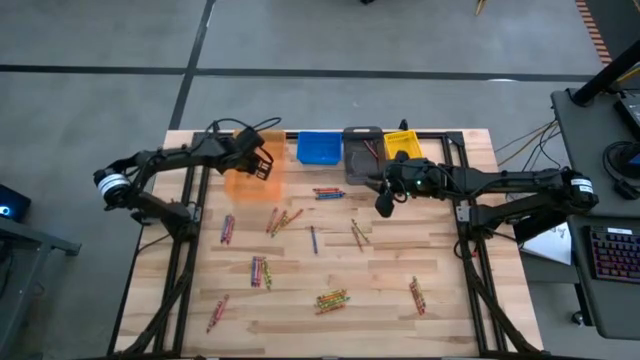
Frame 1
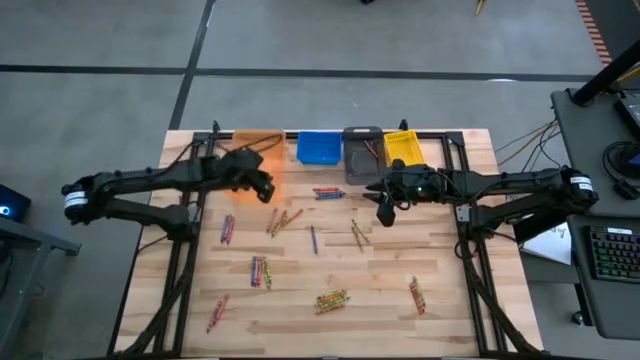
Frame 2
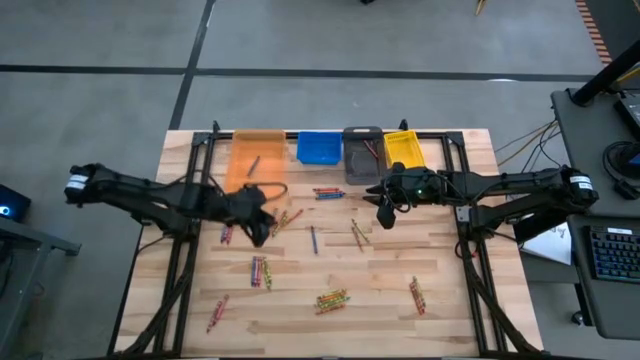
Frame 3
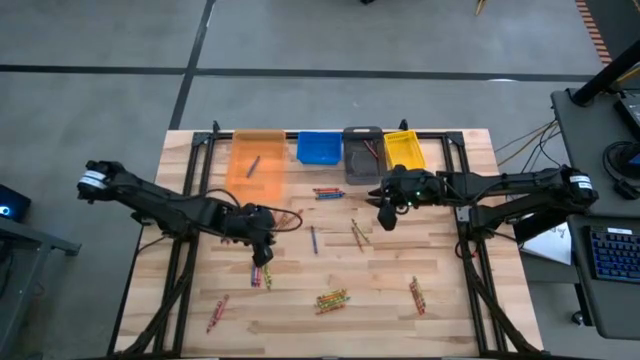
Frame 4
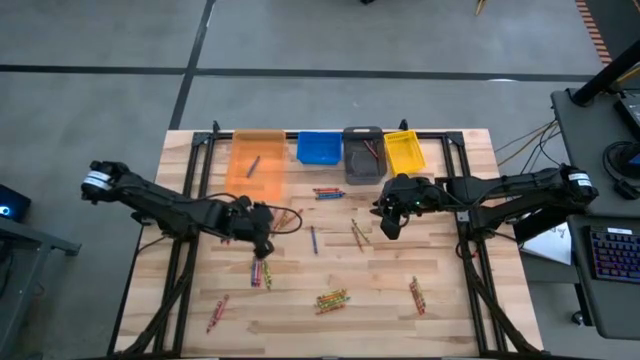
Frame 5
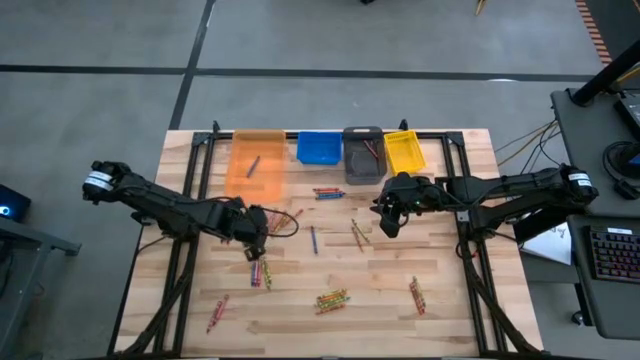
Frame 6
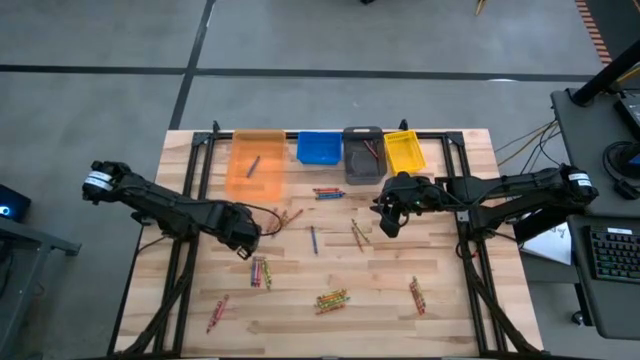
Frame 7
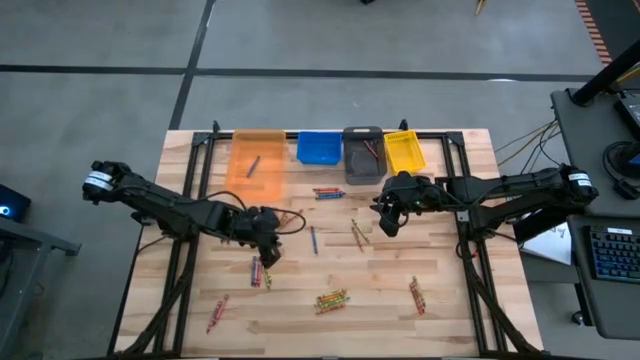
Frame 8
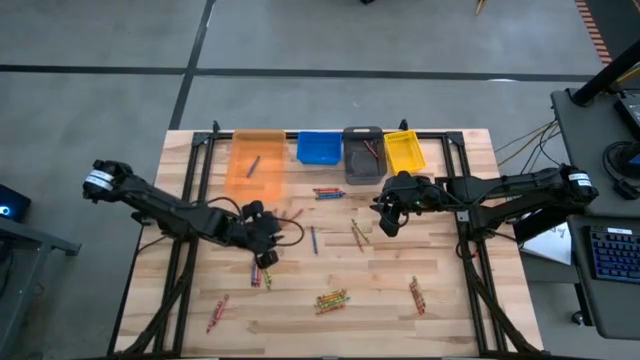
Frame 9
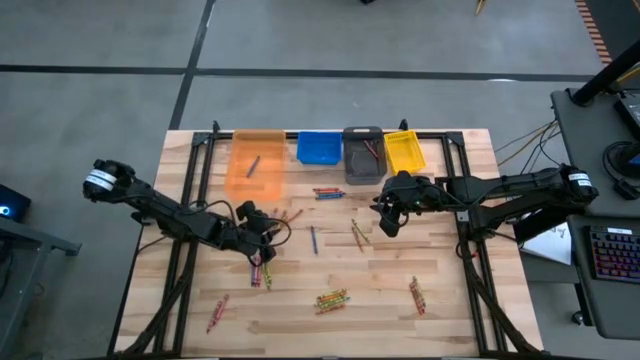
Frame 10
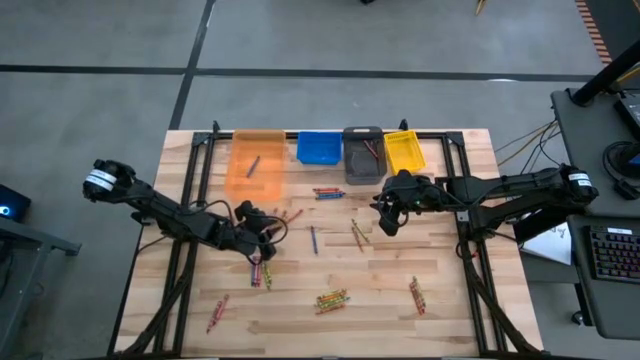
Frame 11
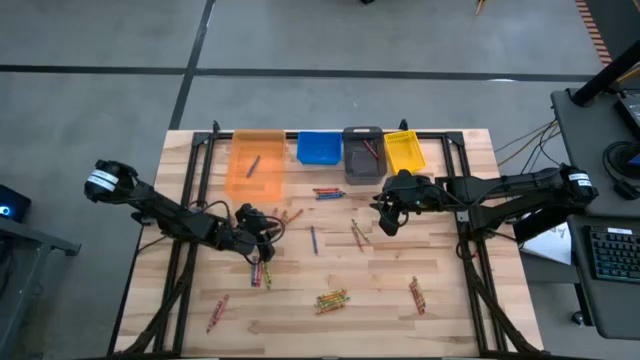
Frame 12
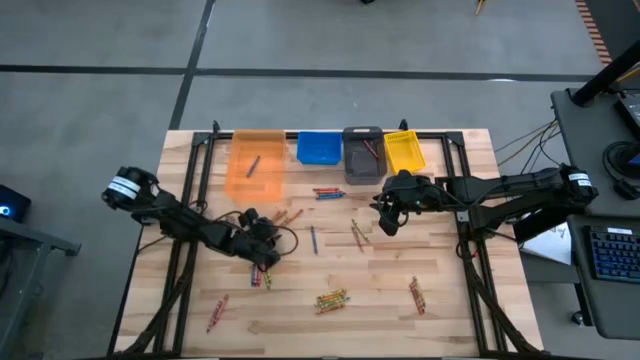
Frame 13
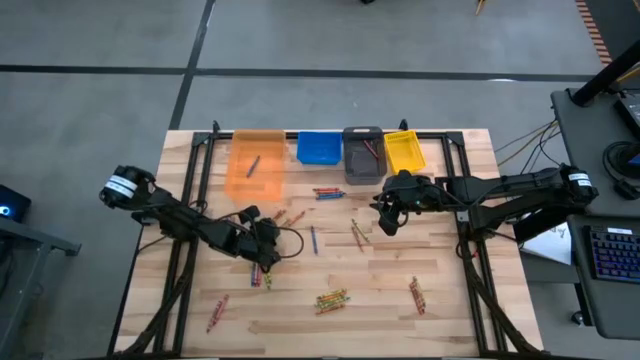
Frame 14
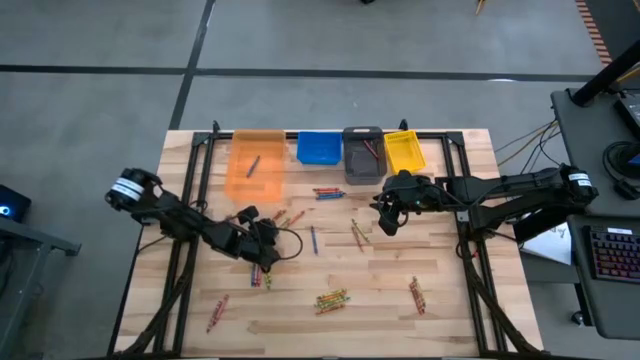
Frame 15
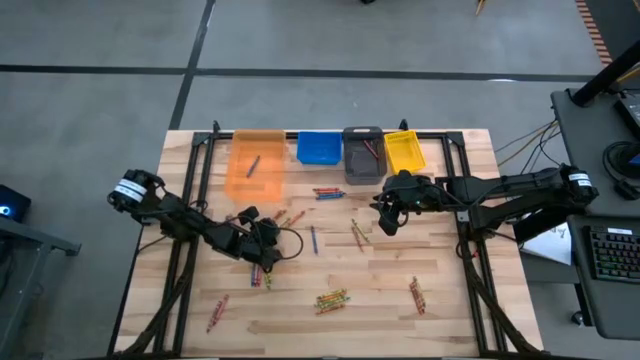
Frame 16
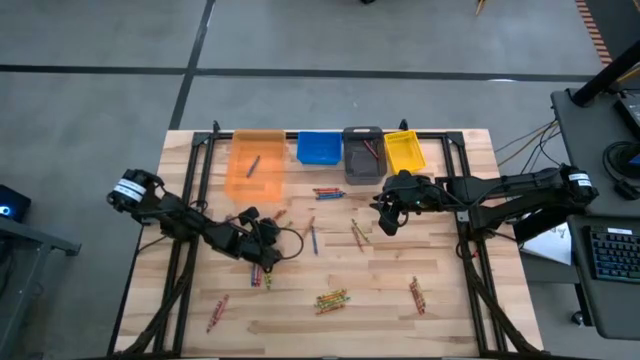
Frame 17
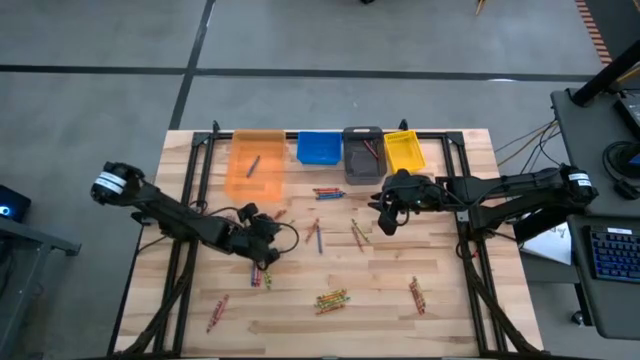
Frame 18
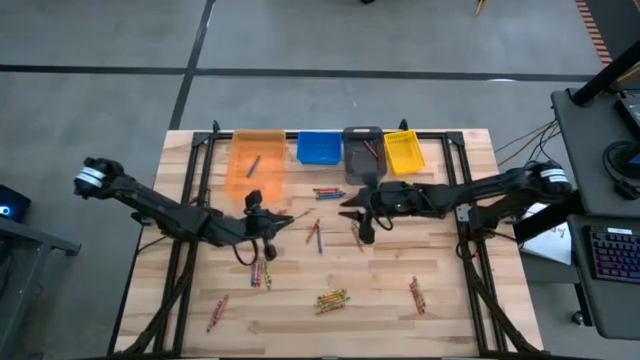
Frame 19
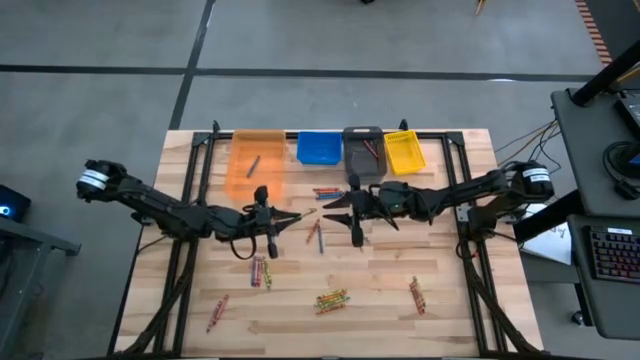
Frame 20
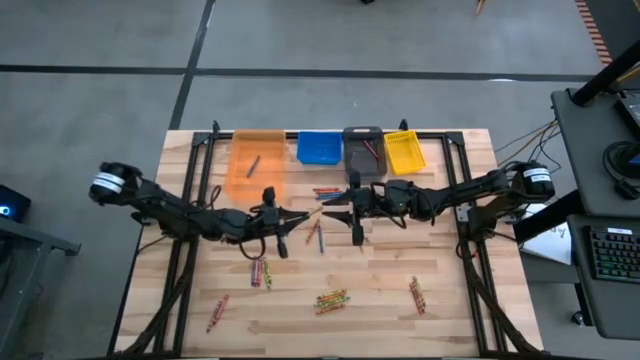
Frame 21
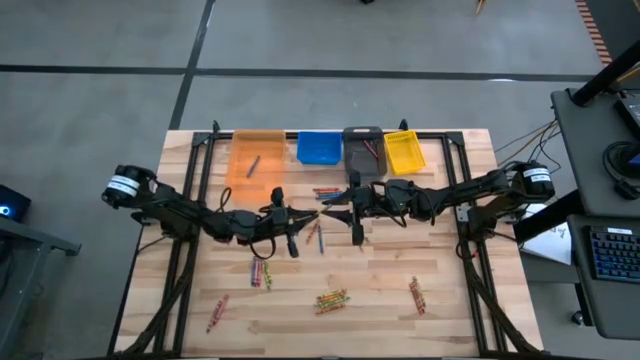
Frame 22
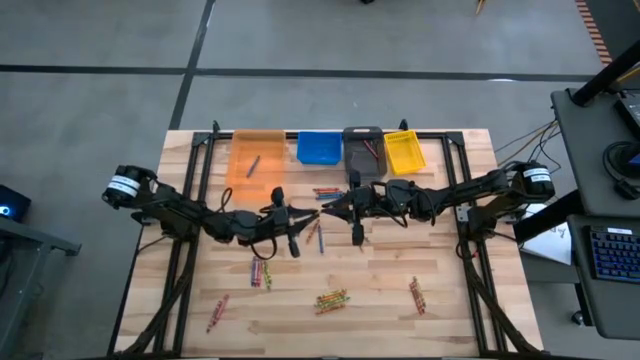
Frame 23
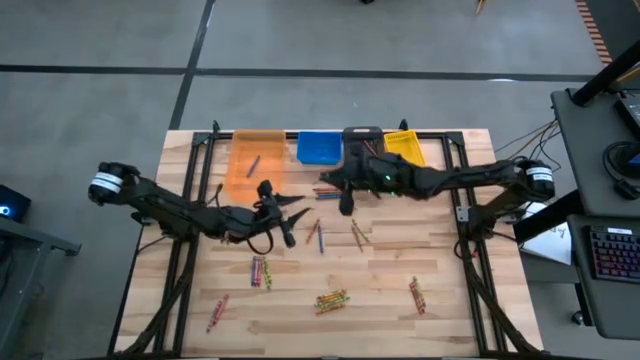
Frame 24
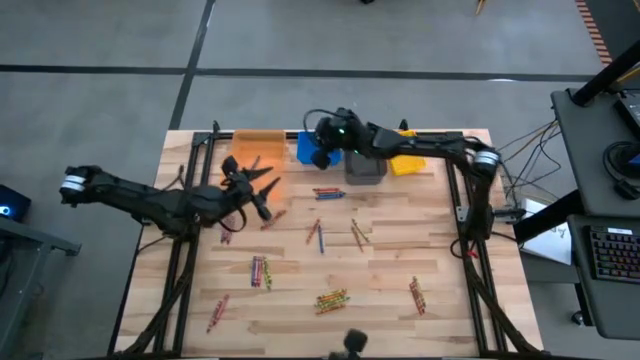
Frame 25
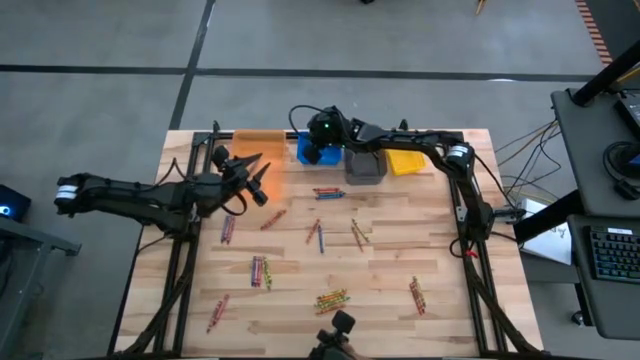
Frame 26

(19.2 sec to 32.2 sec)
Task: Sort crayons
Put the green crayon into the blue bin

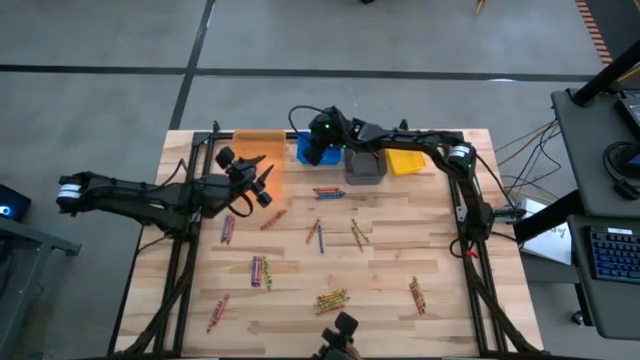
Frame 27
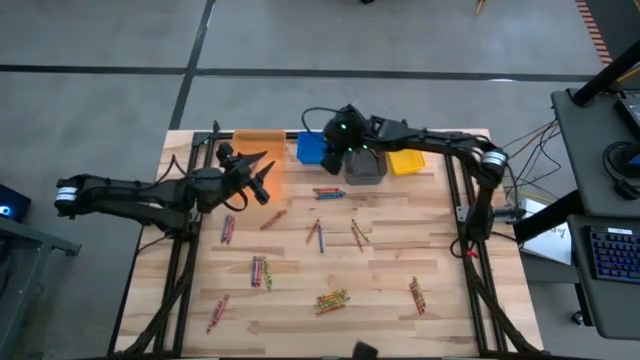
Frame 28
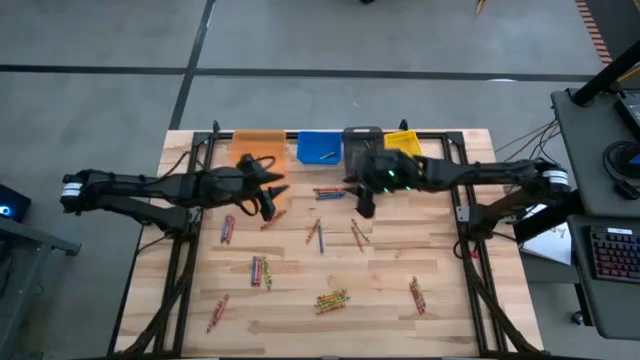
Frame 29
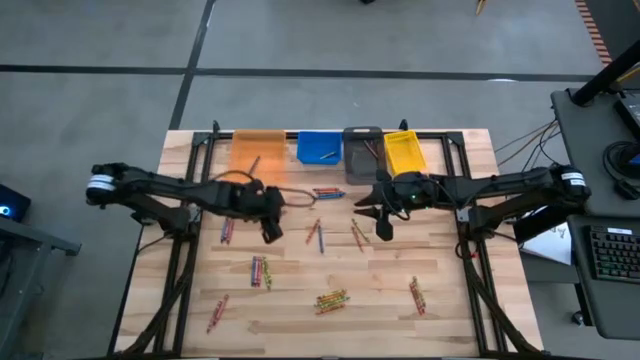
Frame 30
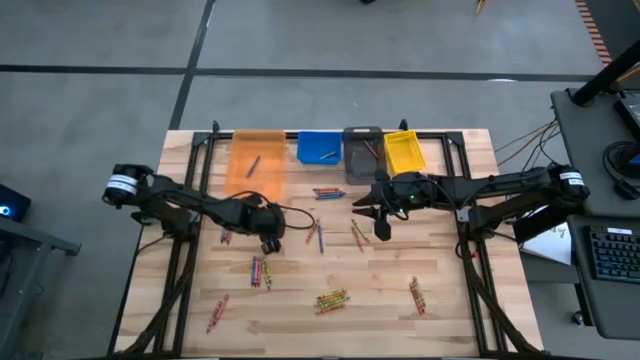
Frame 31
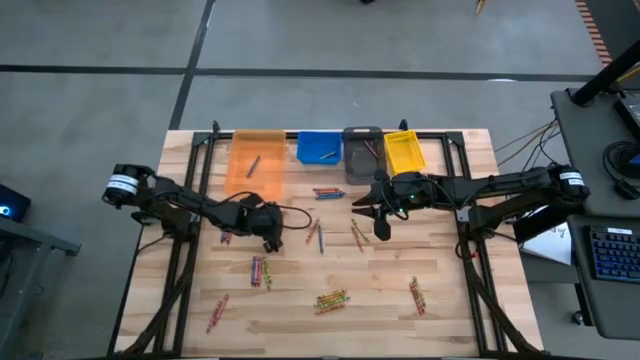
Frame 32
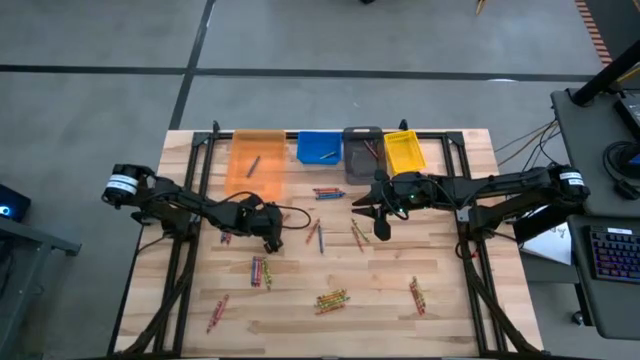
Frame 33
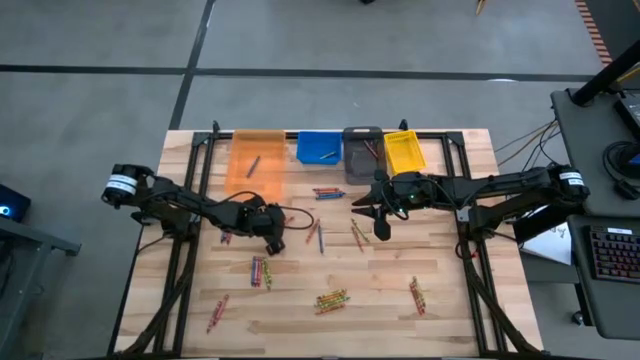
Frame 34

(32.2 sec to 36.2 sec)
Put the orange crayon into the yellow bin

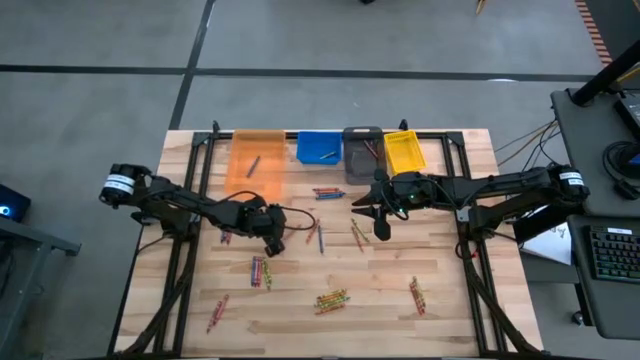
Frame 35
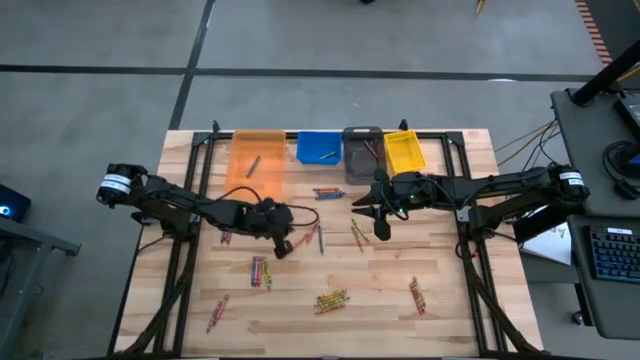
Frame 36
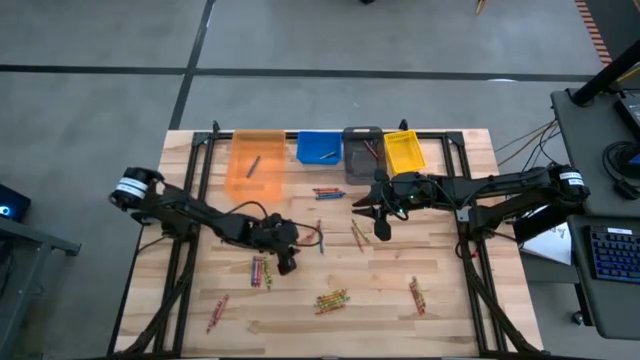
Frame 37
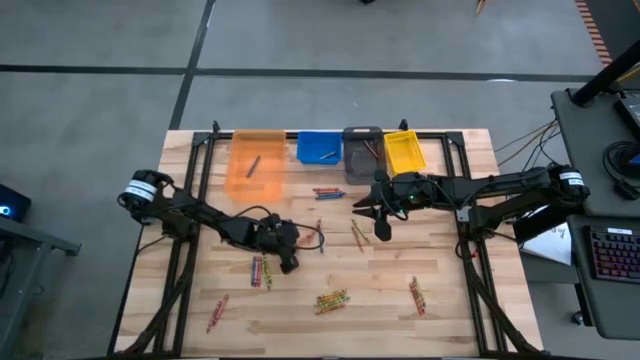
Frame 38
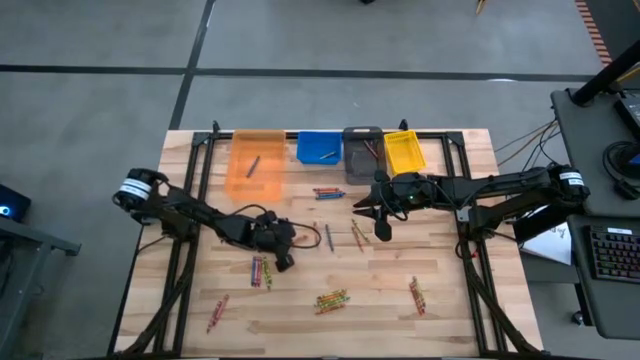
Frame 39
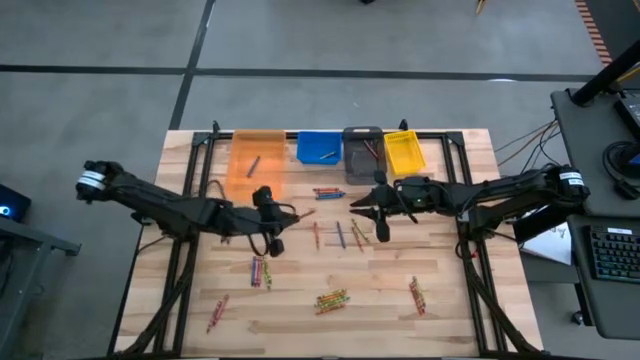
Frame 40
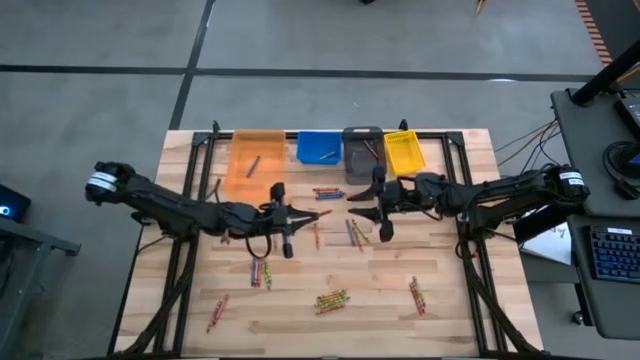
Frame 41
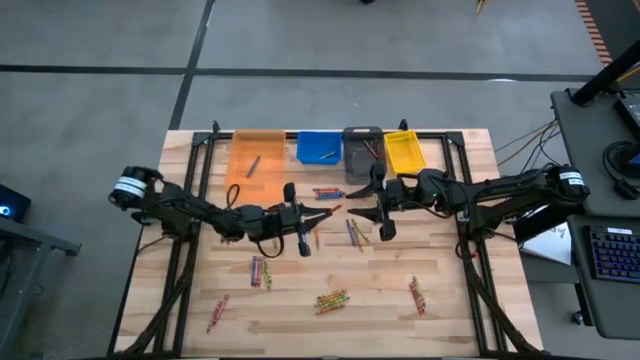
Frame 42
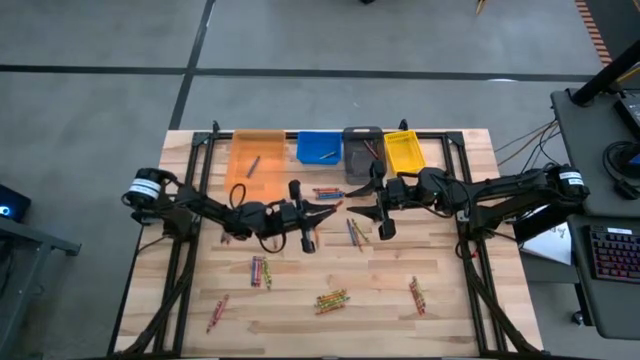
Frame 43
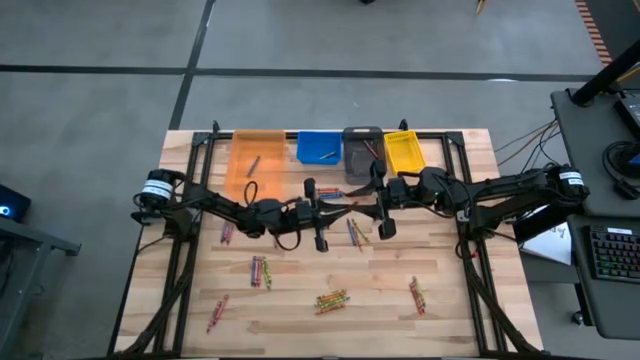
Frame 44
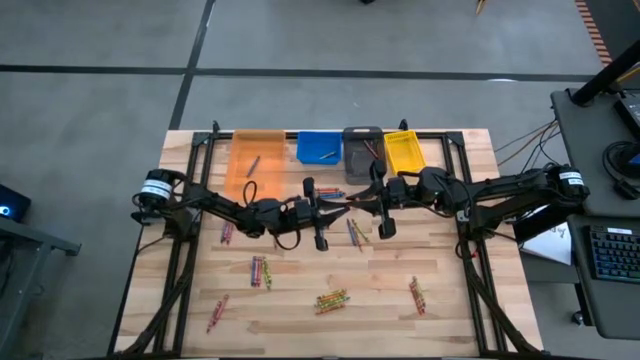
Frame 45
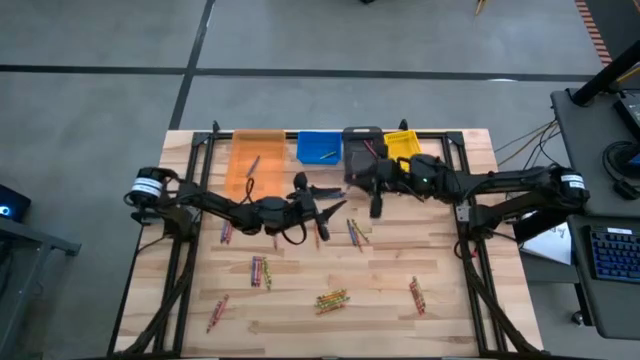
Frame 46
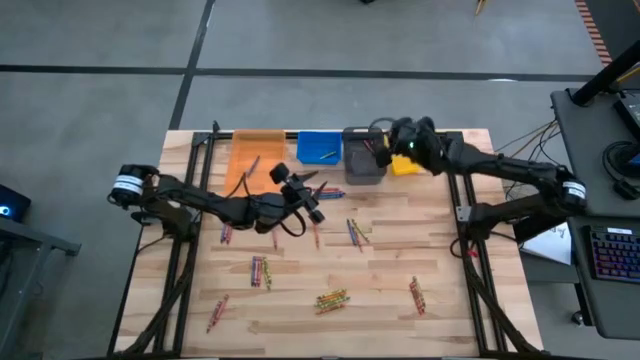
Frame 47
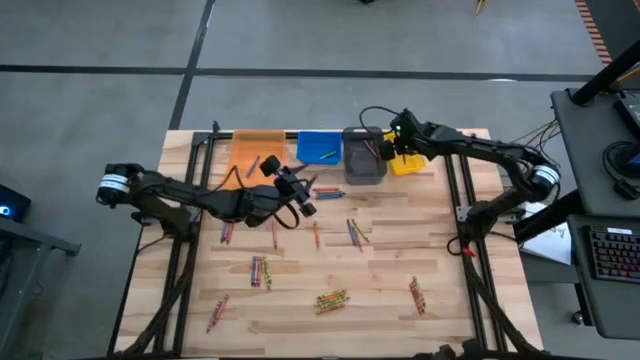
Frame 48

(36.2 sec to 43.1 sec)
Put the orange crayon into the yellow bin
